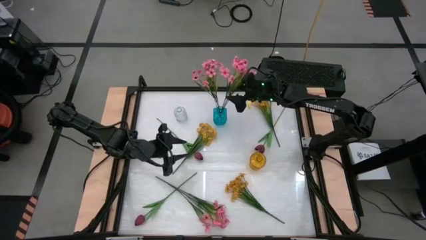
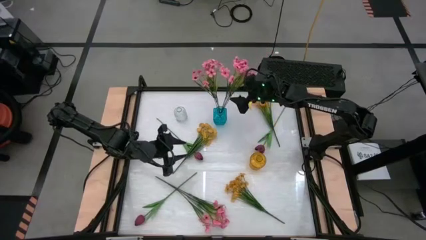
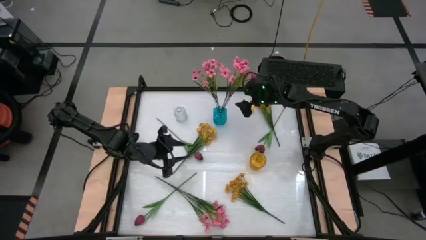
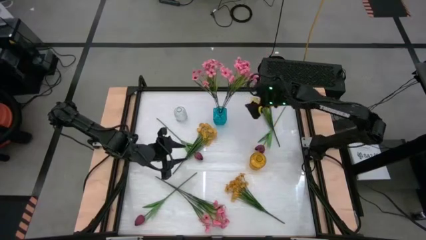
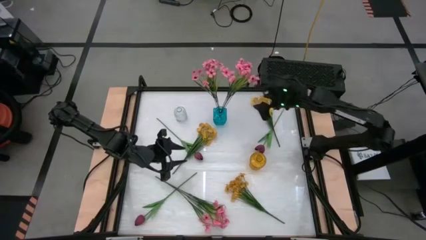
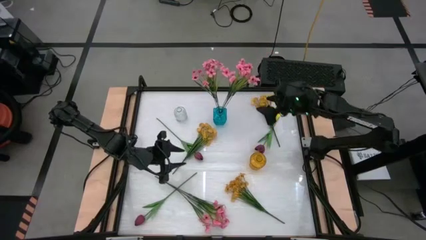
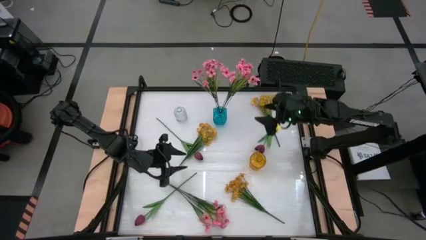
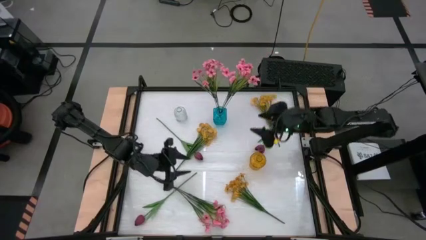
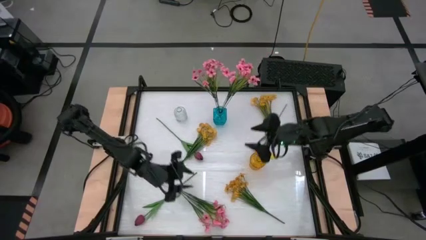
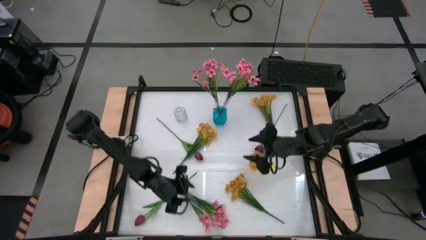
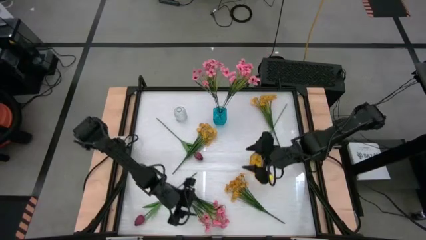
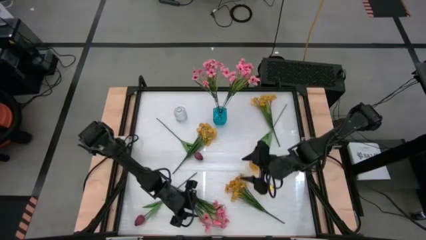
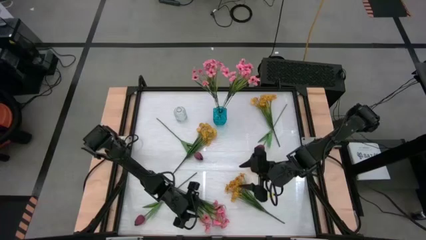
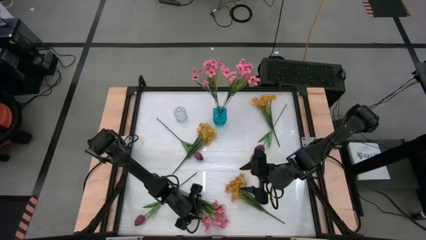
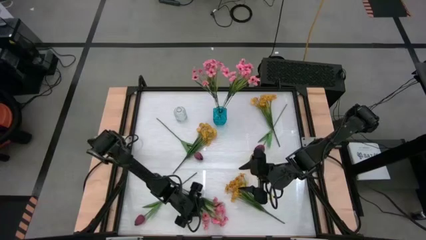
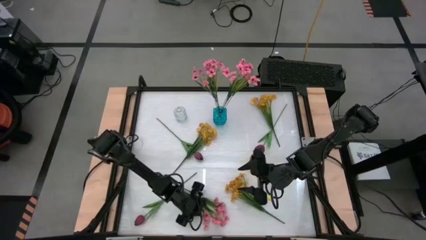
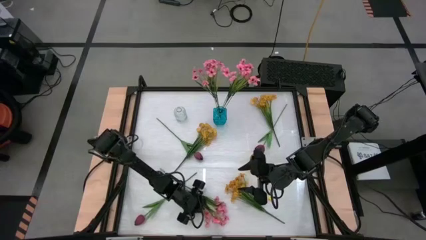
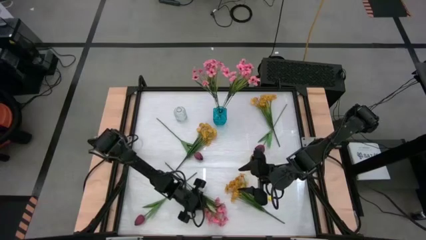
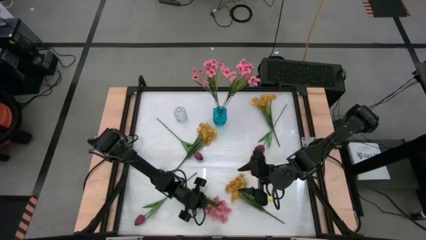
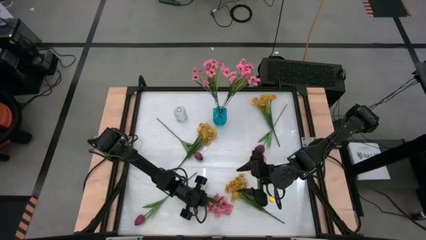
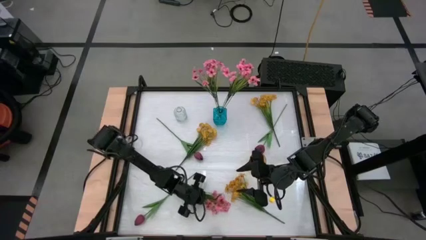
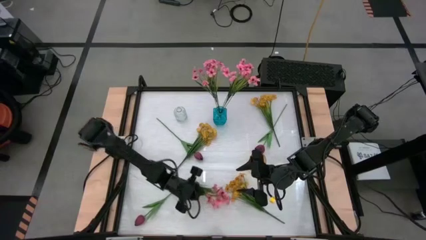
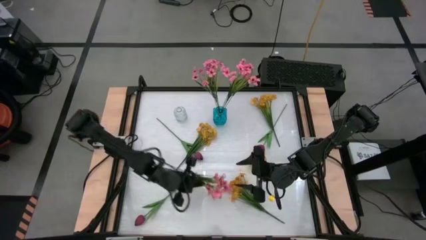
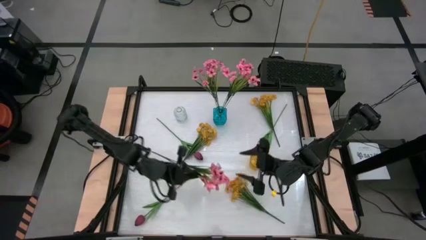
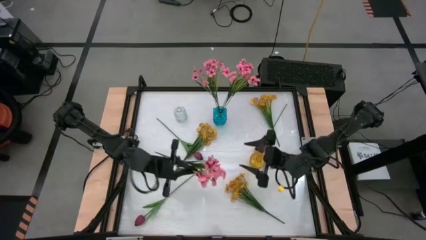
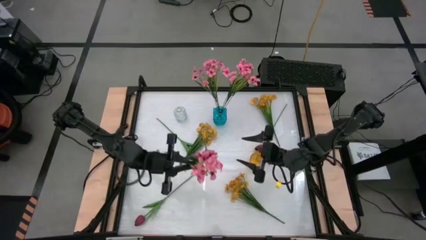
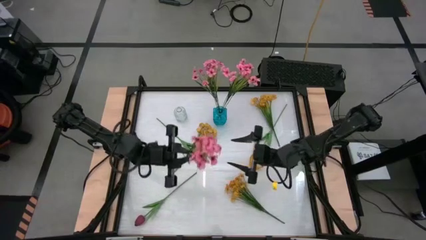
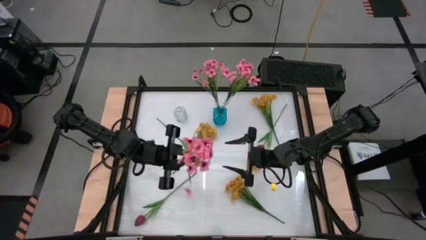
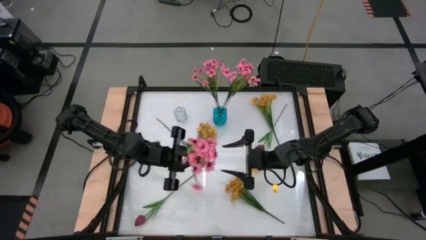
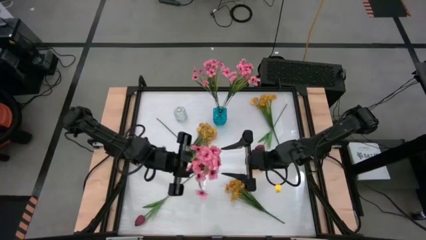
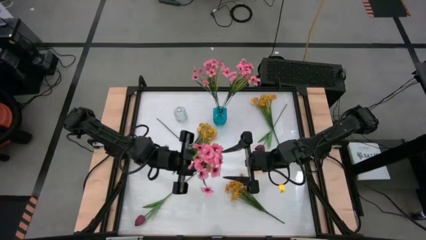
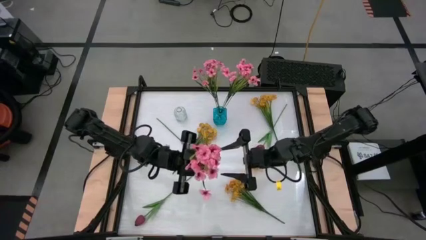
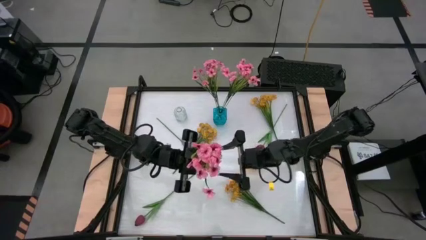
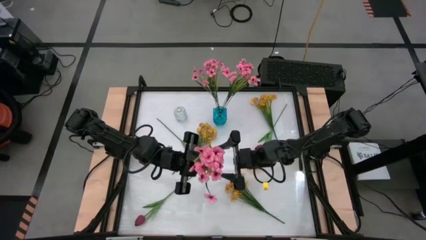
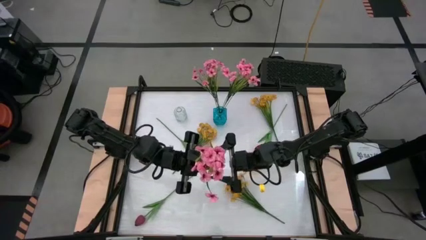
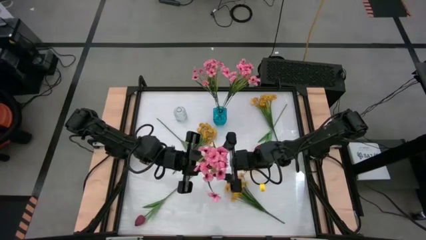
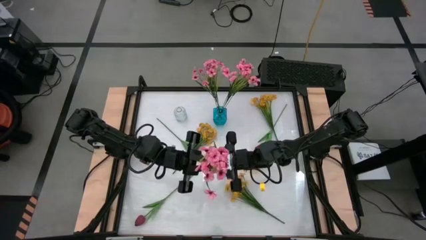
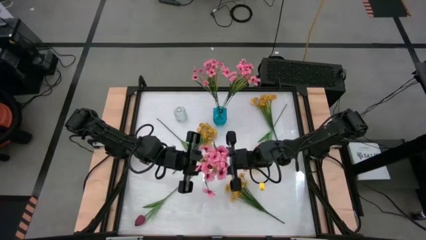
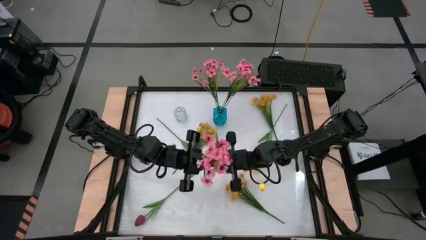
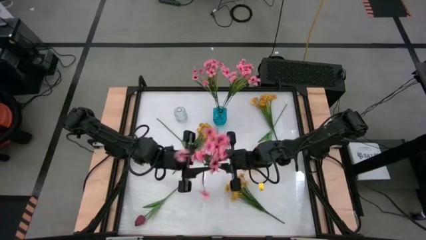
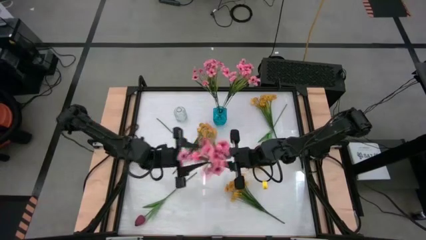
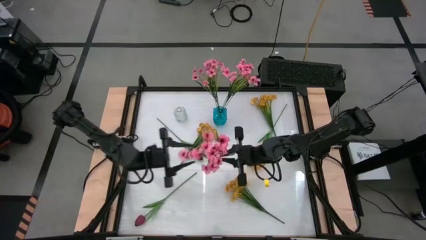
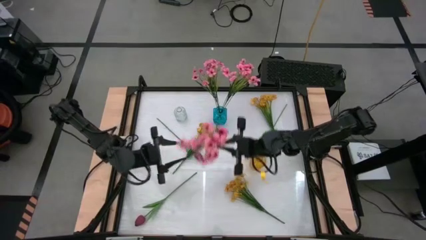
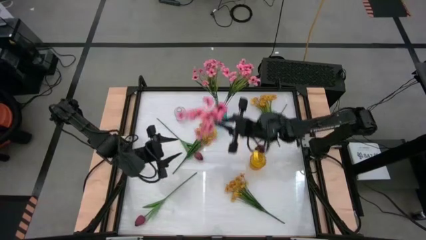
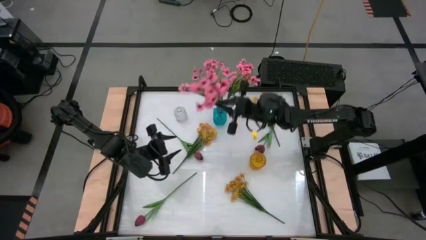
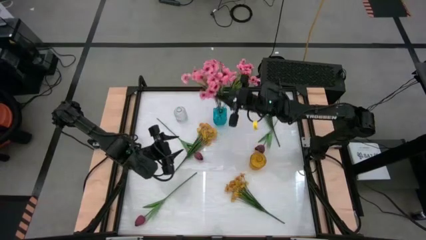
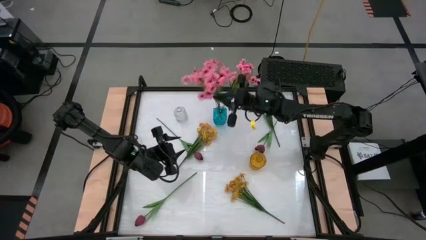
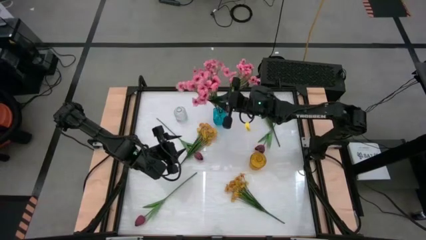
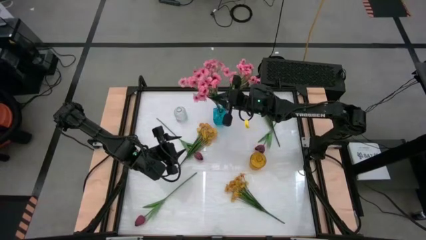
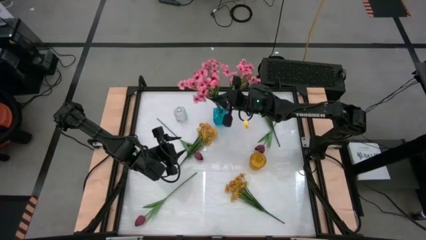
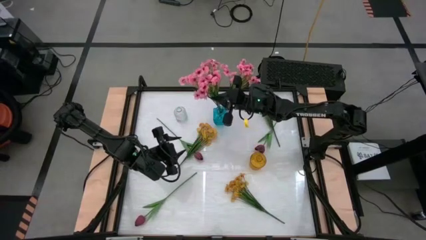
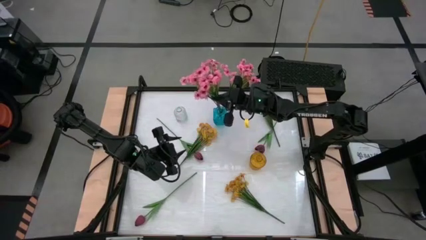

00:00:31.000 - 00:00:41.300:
Task: Sort flowers into vase by color
Put the pink flowers into the blue vase
